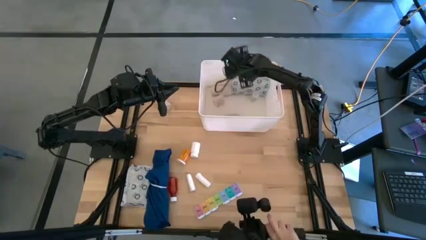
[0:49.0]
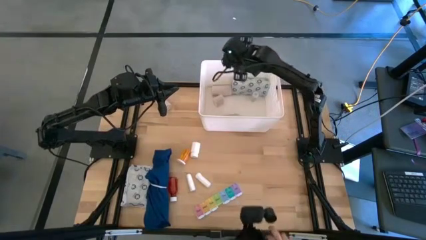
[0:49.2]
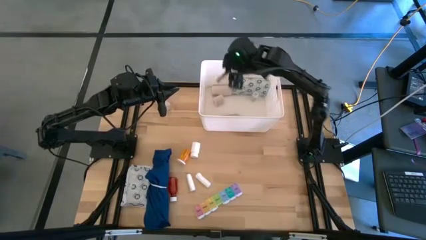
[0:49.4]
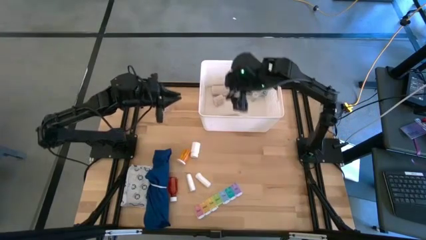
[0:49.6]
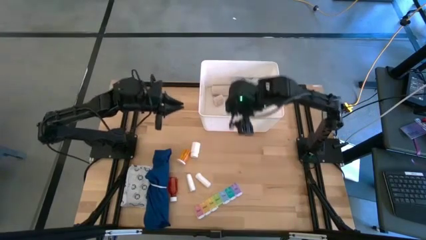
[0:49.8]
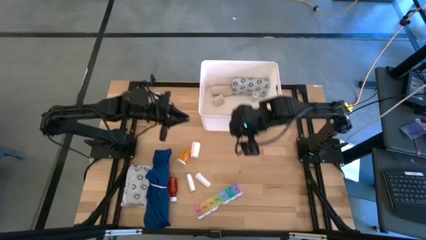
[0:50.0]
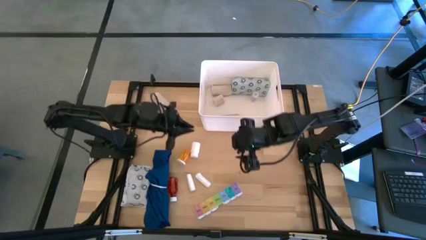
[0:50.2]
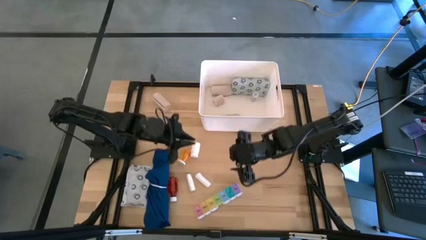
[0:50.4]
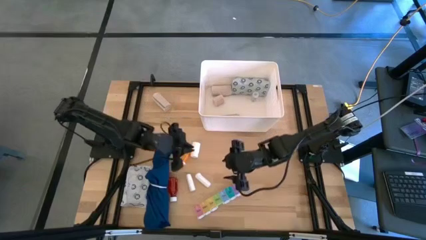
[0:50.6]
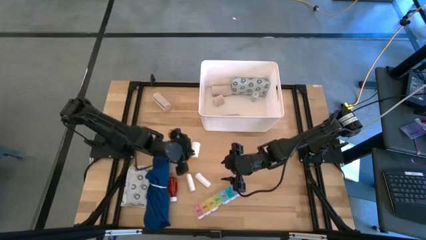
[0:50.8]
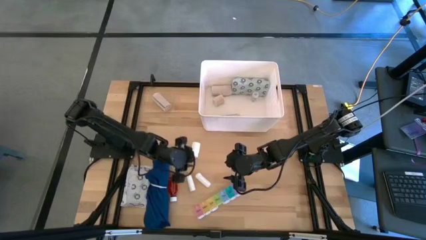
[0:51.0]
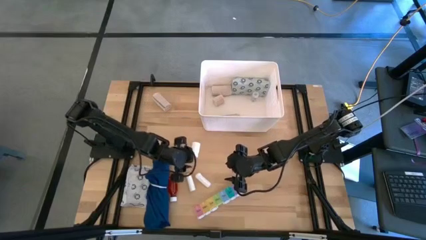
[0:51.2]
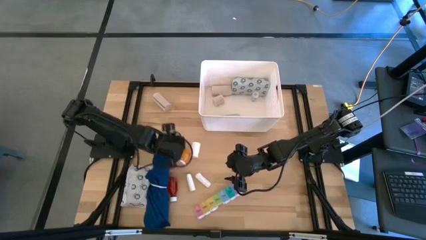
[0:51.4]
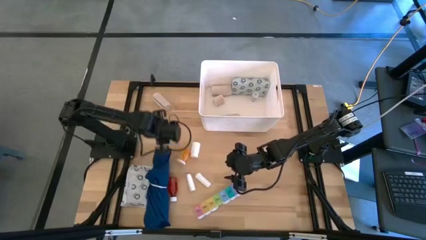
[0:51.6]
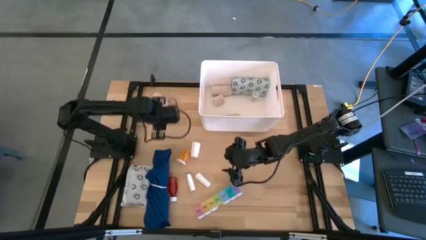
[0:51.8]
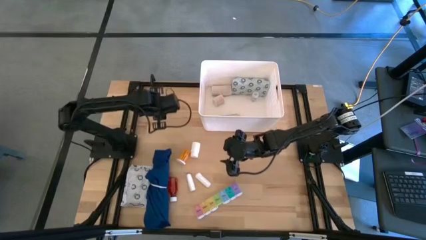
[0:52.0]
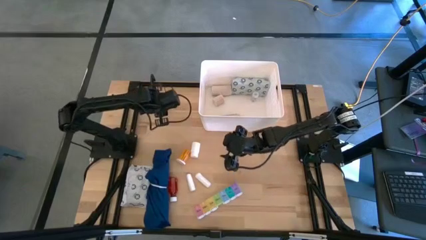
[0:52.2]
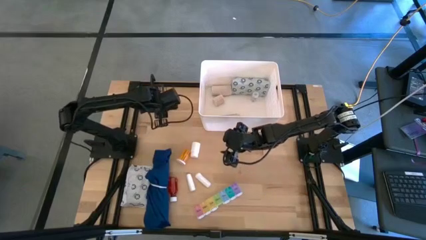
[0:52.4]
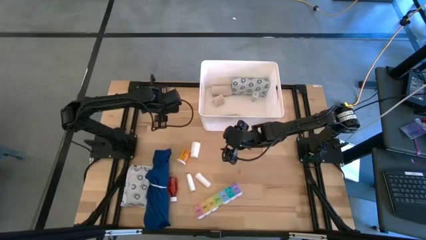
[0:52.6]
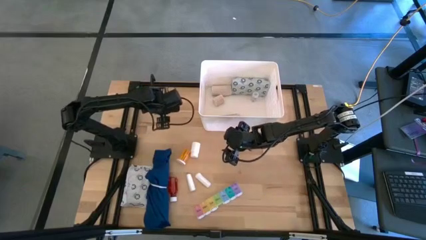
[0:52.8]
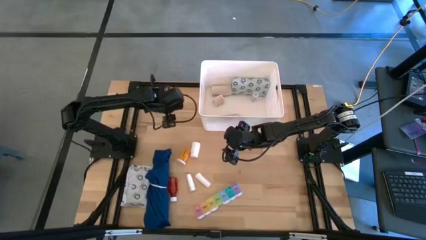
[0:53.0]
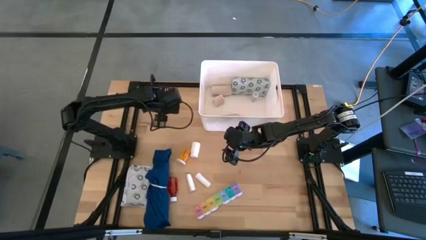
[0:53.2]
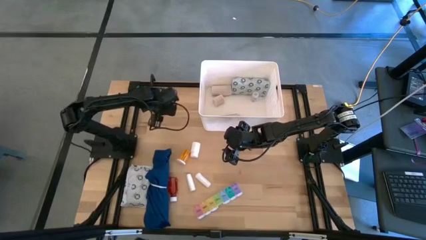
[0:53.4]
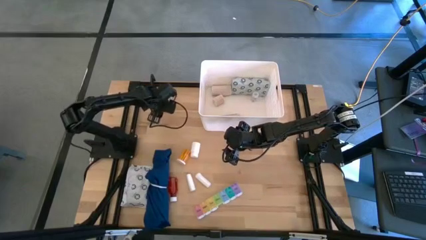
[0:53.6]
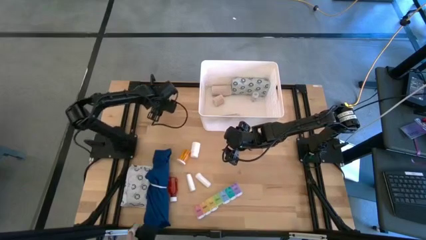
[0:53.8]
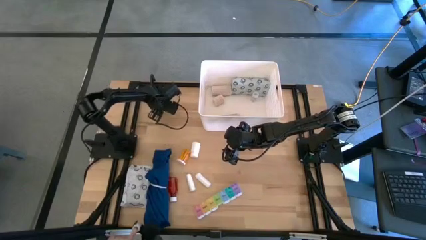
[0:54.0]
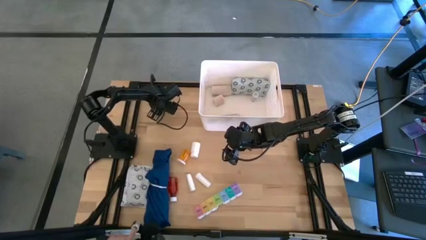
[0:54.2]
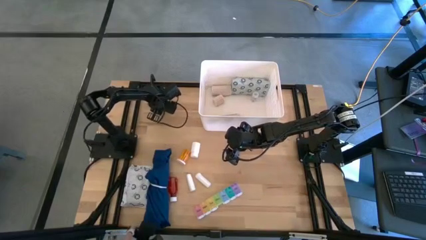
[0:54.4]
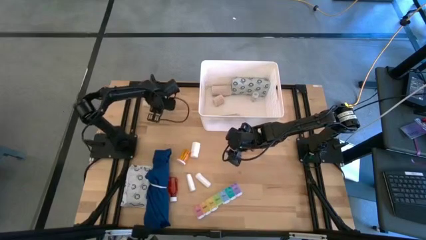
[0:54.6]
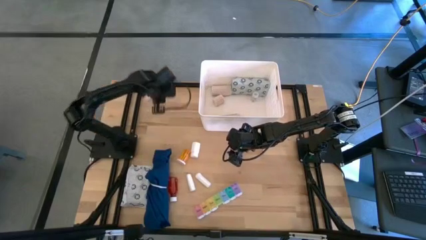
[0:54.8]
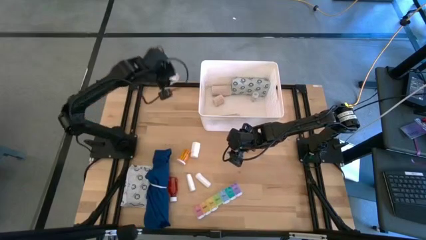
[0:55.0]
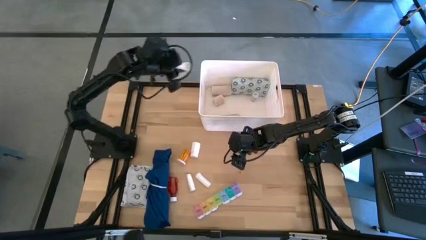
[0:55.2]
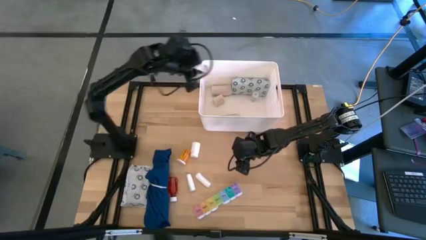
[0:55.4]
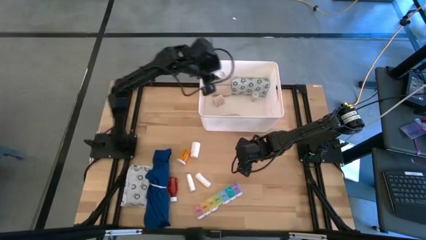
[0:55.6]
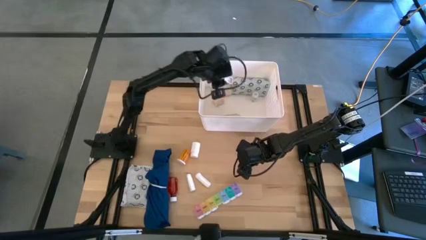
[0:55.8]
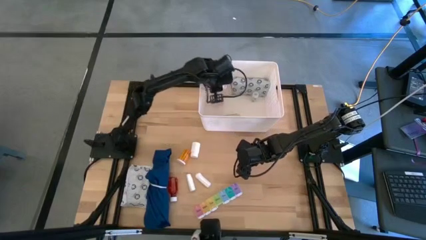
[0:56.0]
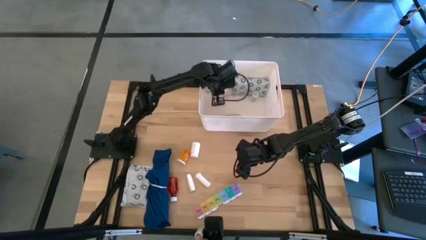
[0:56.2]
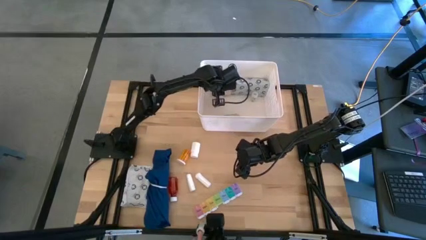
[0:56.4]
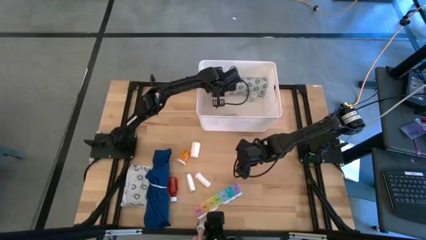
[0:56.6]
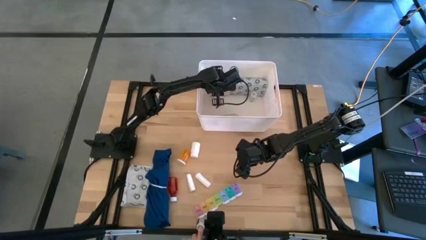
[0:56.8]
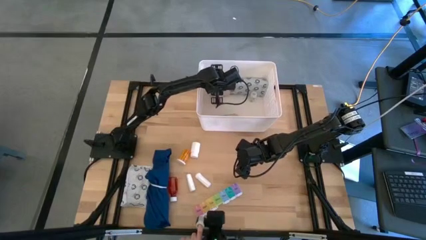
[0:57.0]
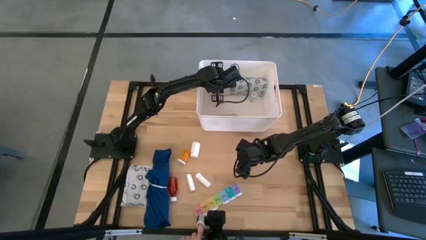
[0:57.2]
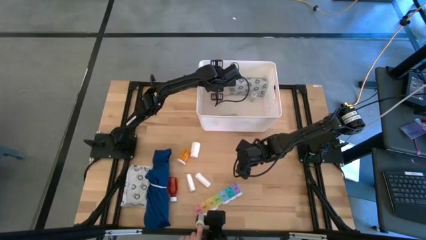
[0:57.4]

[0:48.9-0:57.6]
Task: Pick & place medical supplies in basket/bin
Put the rolled brown bandage into the white container

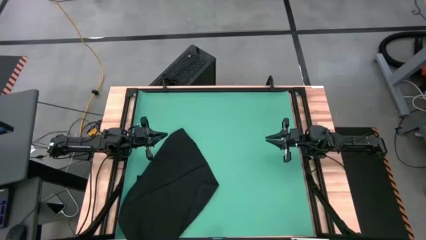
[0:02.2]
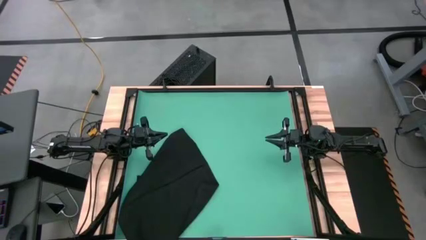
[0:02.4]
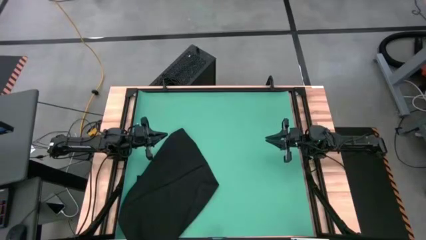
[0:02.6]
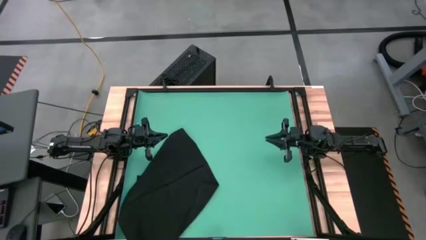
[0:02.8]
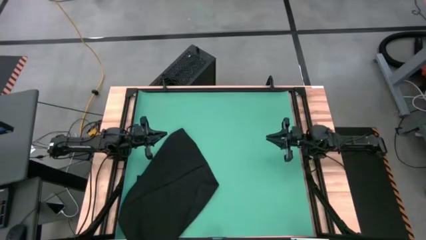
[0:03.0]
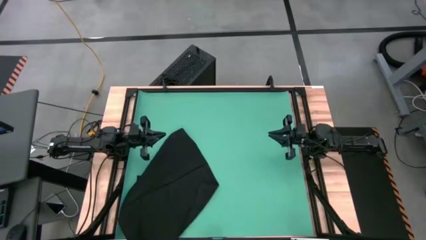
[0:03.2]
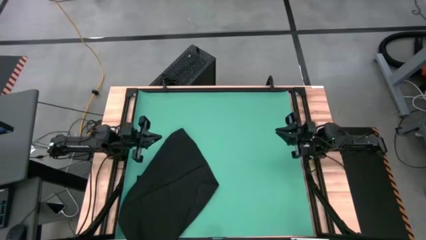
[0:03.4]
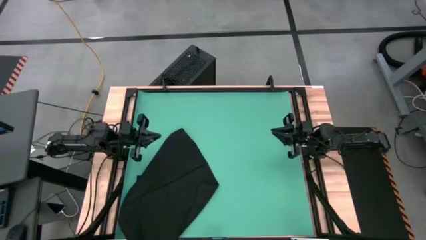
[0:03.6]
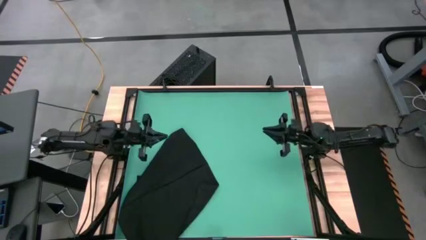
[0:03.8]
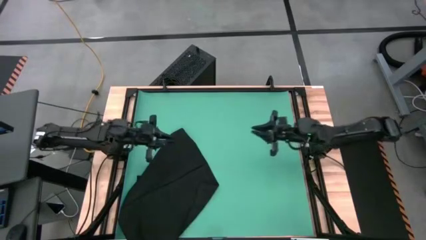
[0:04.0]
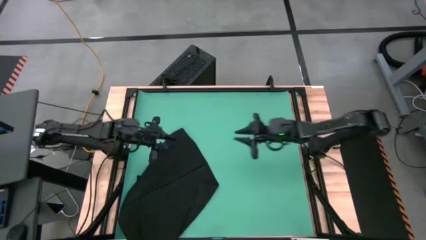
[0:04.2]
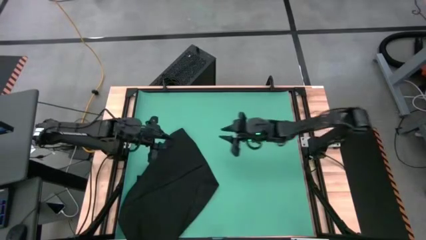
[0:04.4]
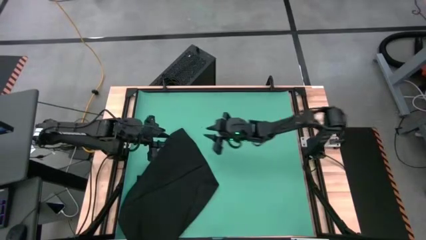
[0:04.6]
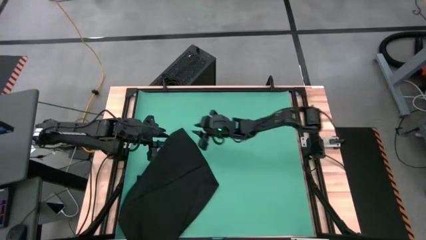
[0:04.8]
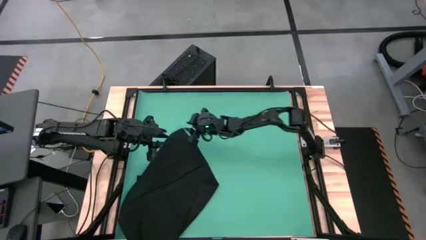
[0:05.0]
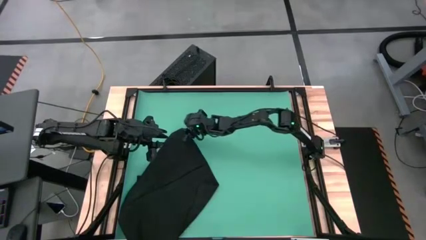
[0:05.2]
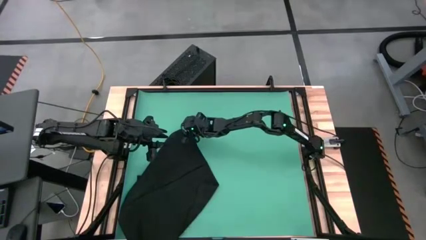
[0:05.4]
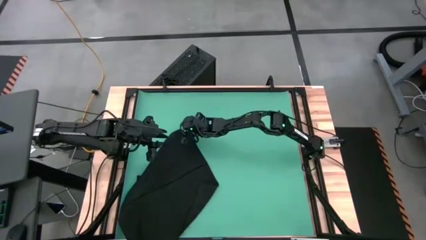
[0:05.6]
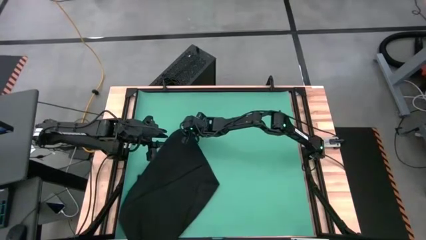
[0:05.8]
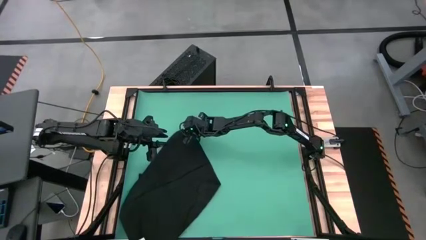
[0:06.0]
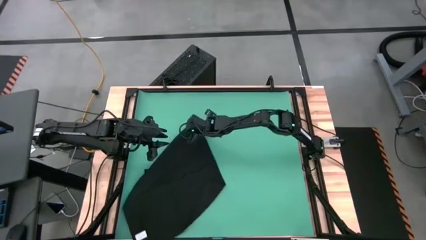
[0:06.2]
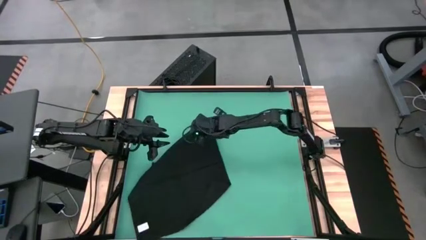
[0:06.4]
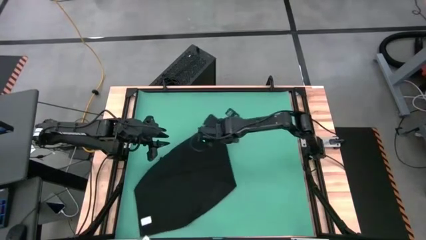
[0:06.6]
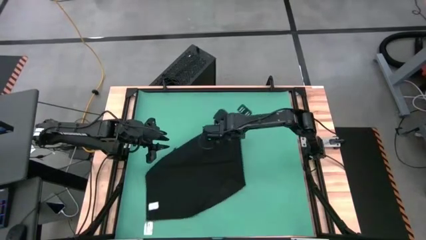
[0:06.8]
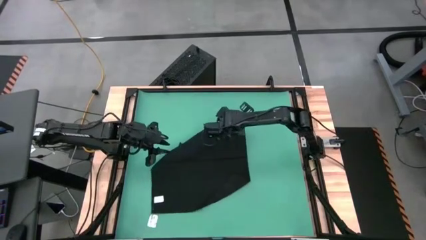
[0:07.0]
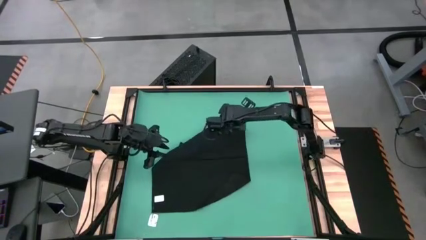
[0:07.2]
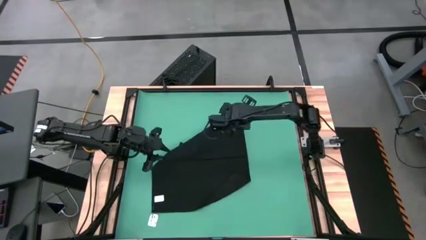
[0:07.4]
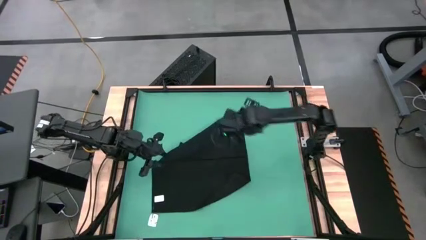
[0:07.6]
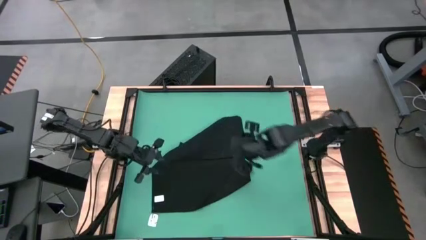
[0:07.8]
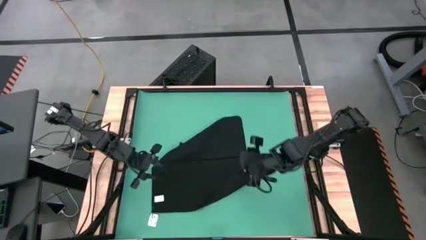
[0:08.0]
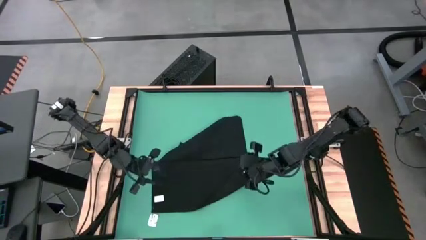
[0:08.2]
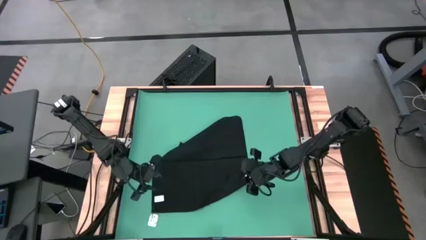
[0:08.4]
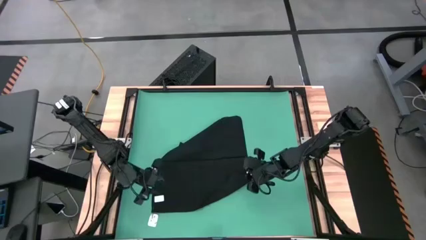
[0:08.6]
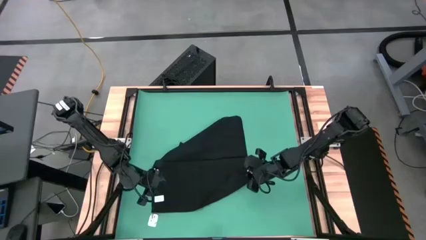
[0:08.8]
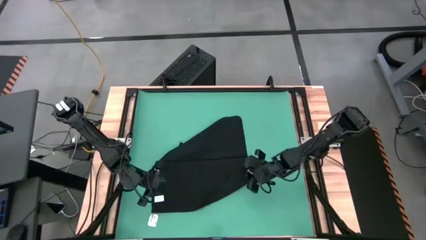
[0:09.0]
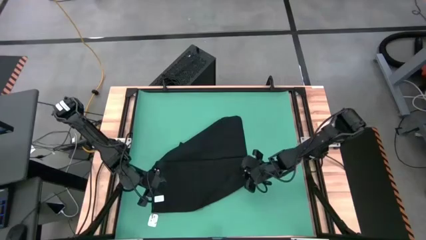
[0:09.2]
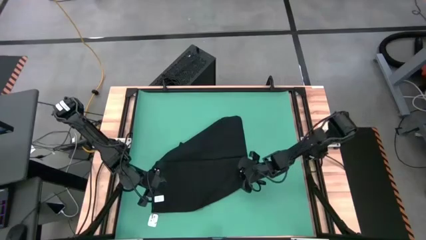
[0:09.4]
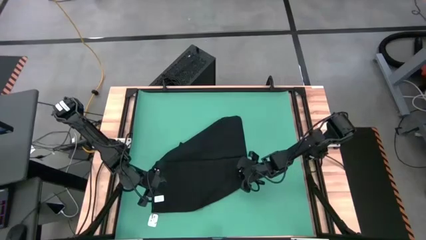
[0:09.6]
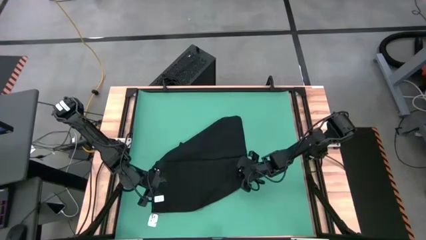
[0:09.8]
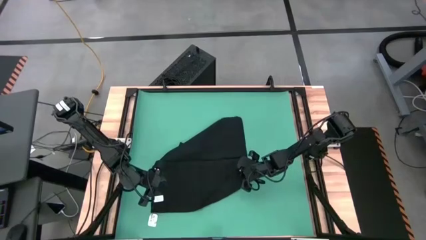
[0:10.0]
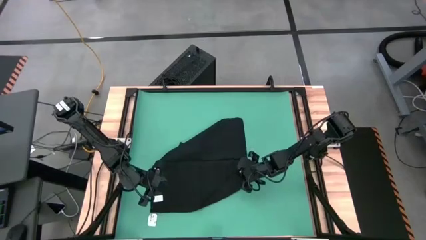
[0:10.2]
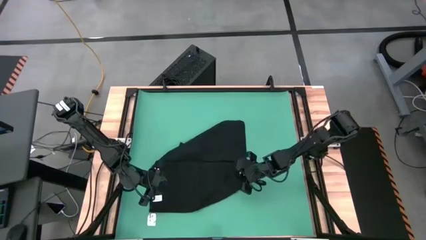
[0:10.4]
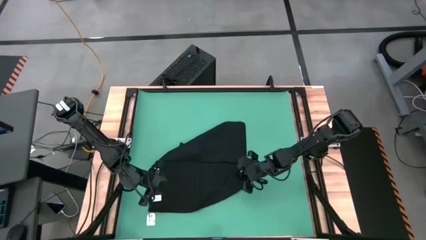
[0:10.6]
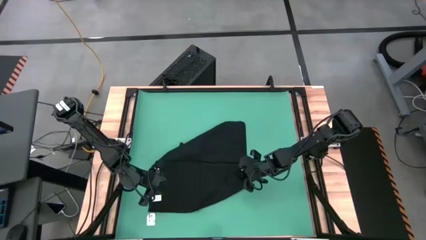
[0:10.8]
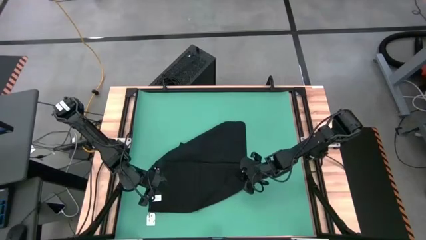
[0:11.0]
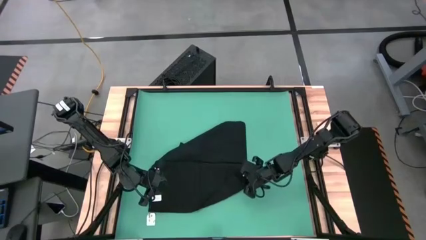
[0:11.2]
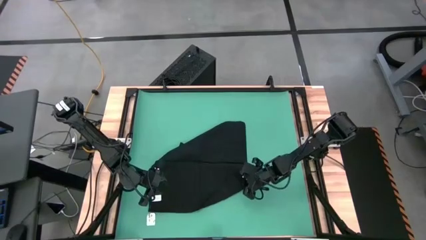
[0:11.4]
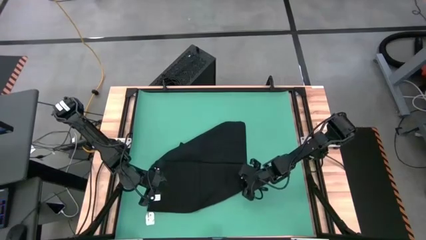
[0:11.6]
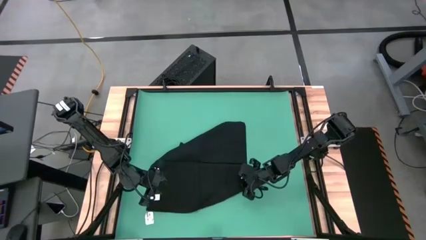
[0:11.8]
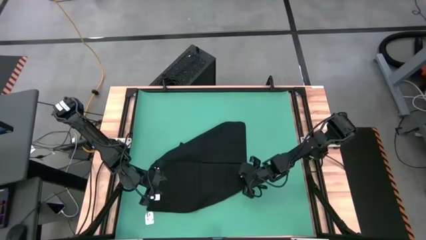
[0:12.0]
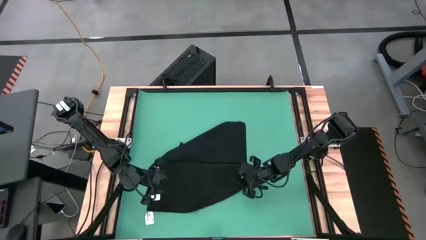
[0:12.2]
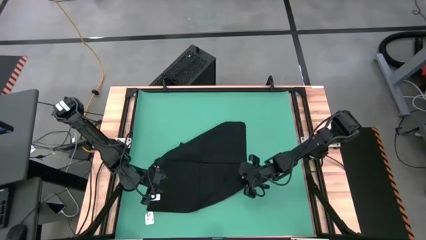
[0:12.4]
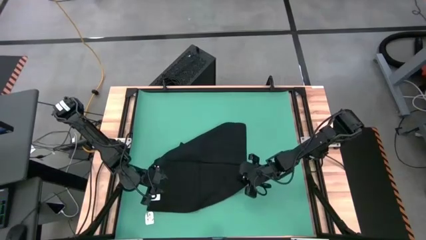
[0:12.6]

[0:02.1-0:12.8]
Task: Roll napkin
Fold the black table napkin
